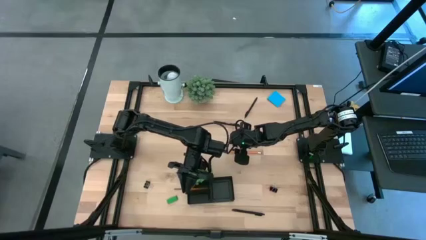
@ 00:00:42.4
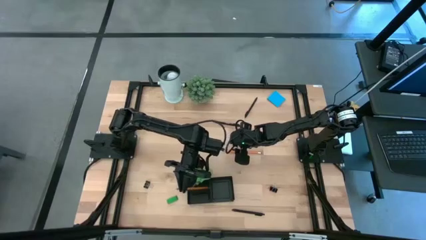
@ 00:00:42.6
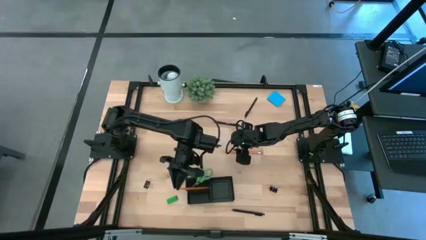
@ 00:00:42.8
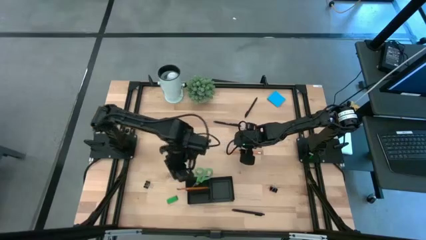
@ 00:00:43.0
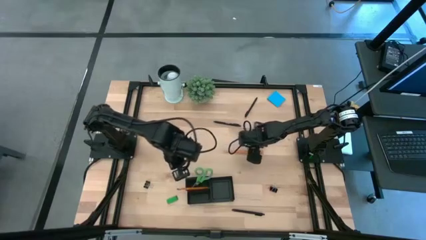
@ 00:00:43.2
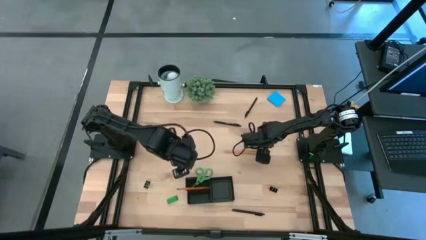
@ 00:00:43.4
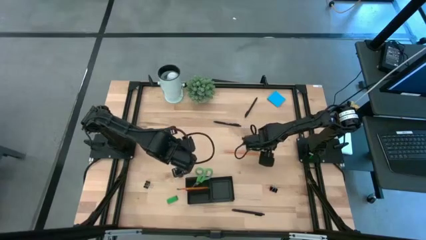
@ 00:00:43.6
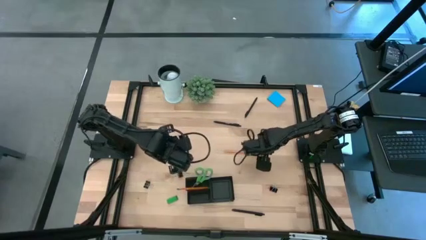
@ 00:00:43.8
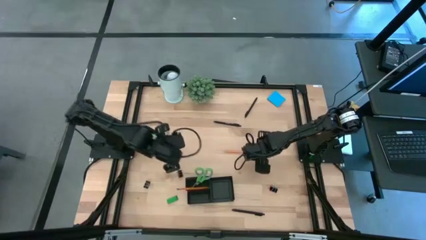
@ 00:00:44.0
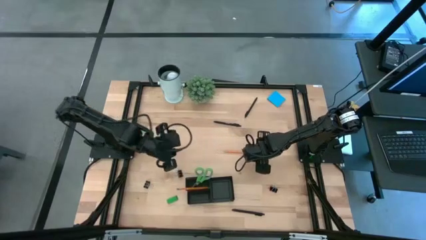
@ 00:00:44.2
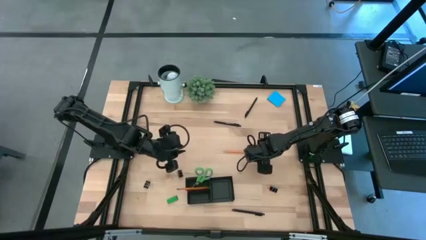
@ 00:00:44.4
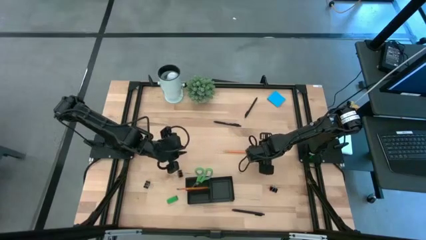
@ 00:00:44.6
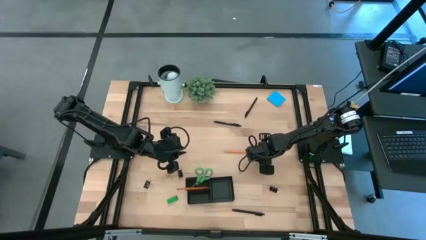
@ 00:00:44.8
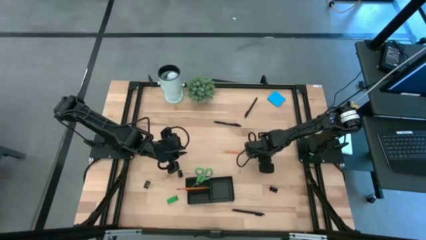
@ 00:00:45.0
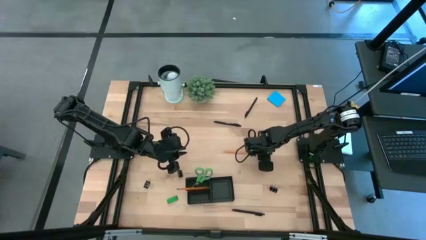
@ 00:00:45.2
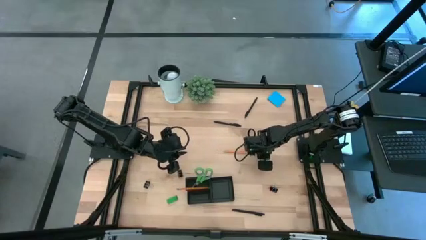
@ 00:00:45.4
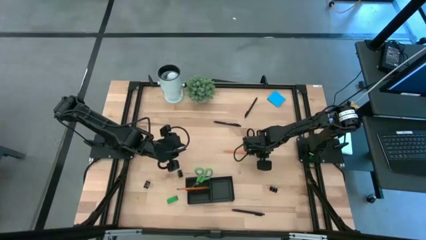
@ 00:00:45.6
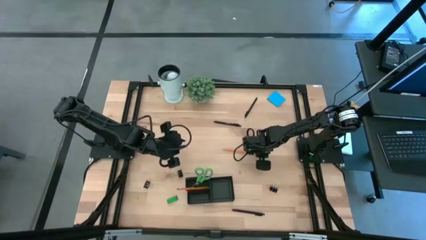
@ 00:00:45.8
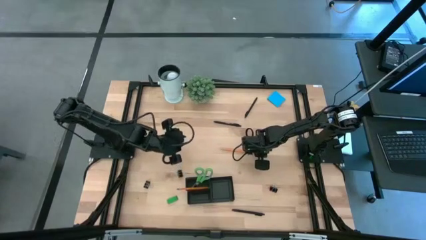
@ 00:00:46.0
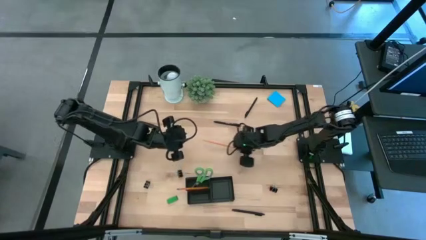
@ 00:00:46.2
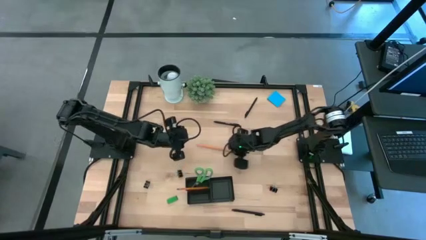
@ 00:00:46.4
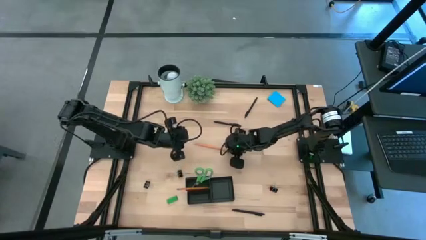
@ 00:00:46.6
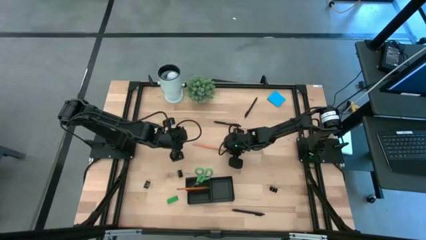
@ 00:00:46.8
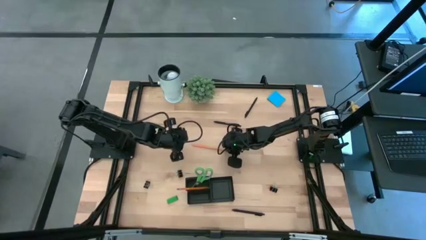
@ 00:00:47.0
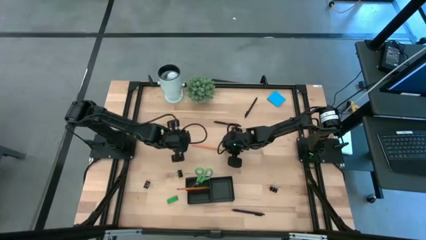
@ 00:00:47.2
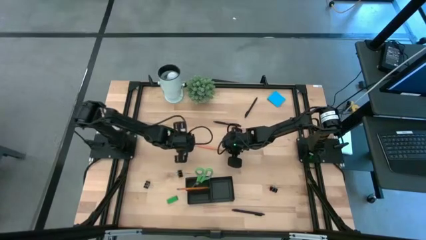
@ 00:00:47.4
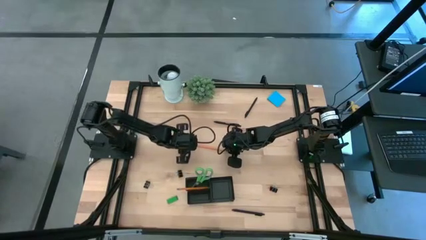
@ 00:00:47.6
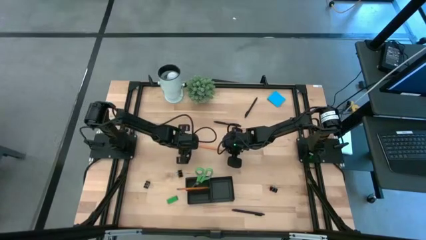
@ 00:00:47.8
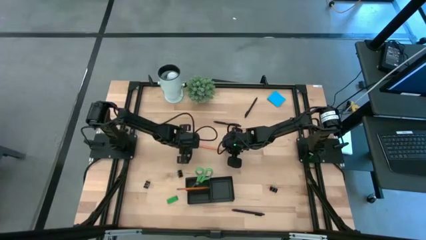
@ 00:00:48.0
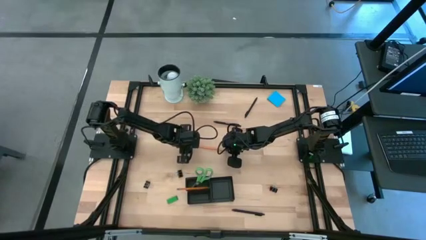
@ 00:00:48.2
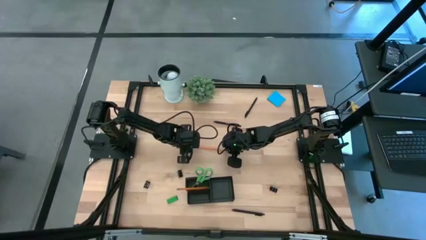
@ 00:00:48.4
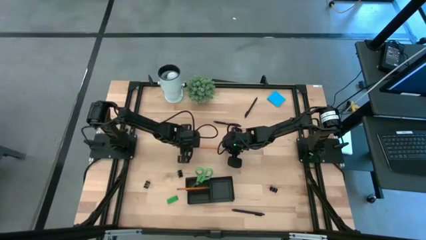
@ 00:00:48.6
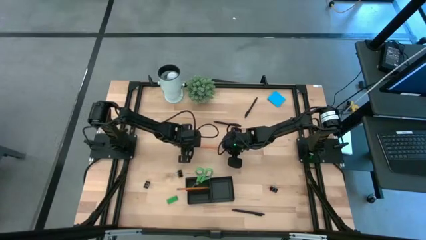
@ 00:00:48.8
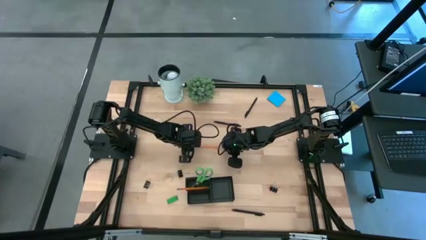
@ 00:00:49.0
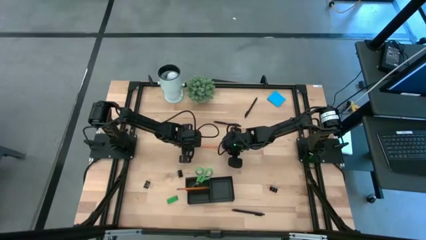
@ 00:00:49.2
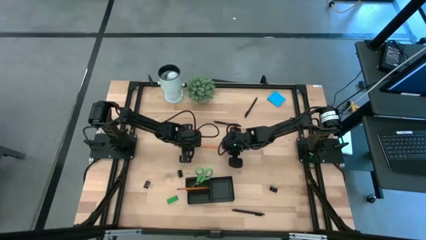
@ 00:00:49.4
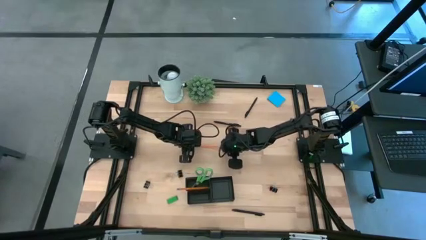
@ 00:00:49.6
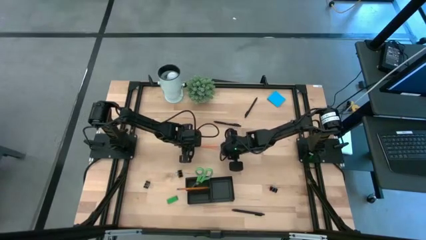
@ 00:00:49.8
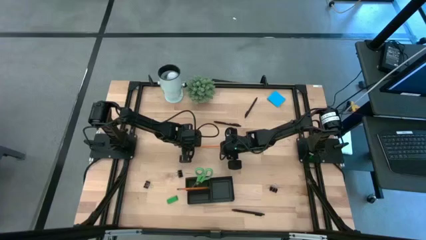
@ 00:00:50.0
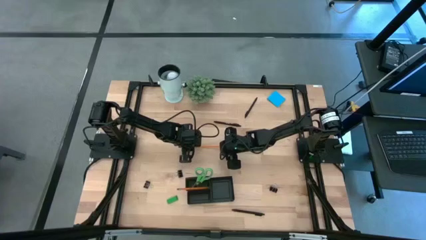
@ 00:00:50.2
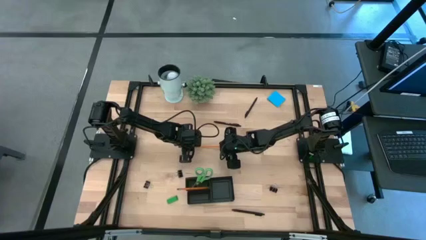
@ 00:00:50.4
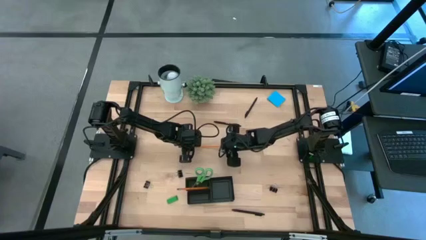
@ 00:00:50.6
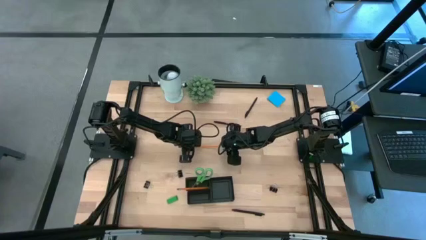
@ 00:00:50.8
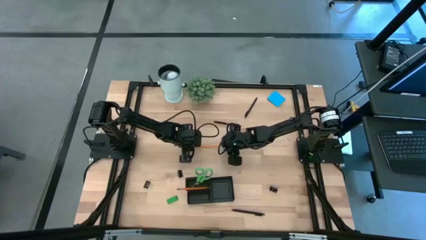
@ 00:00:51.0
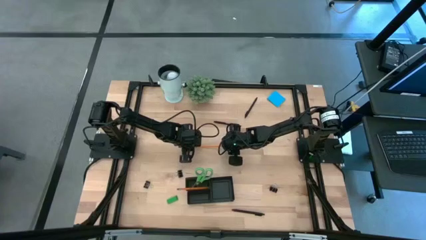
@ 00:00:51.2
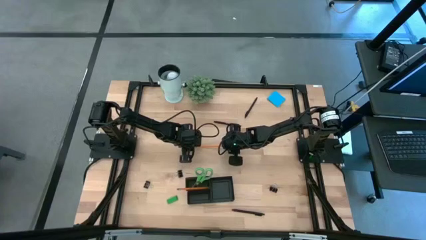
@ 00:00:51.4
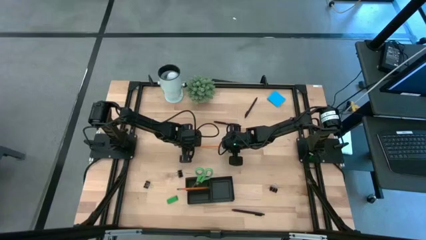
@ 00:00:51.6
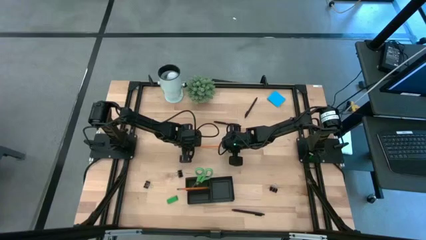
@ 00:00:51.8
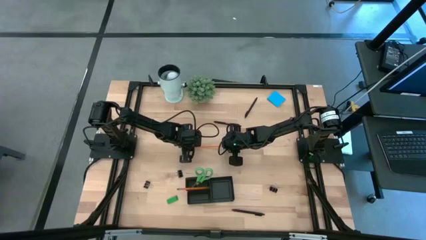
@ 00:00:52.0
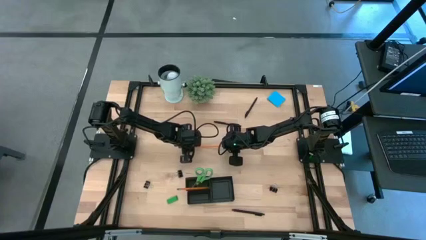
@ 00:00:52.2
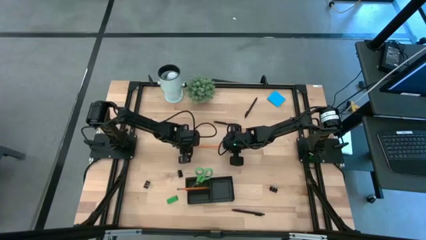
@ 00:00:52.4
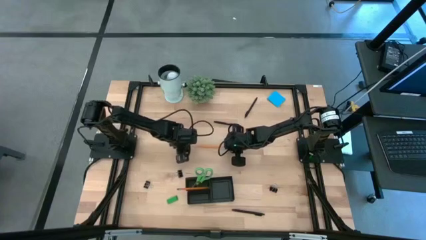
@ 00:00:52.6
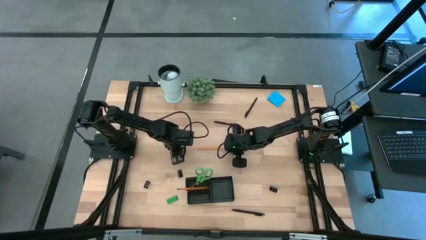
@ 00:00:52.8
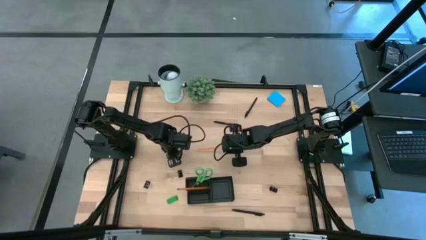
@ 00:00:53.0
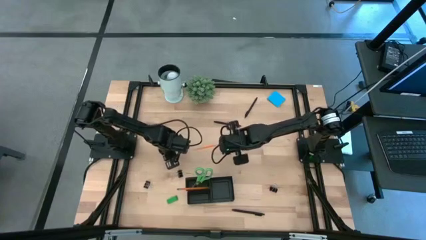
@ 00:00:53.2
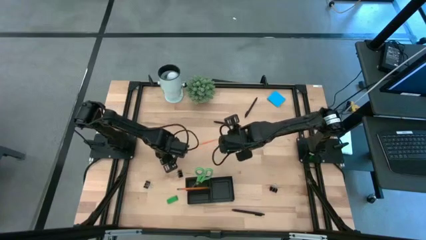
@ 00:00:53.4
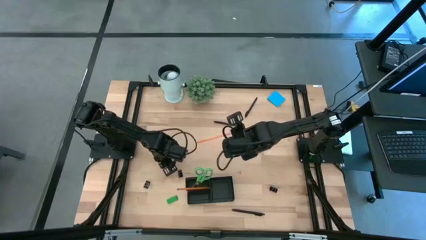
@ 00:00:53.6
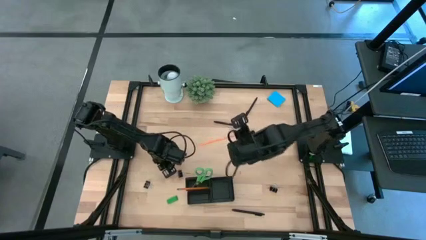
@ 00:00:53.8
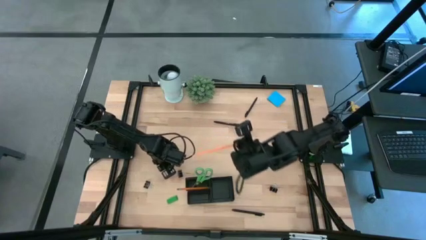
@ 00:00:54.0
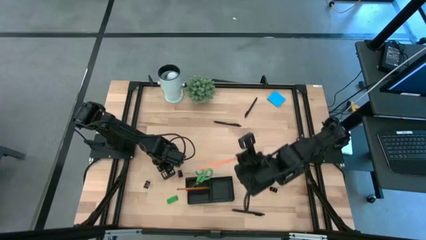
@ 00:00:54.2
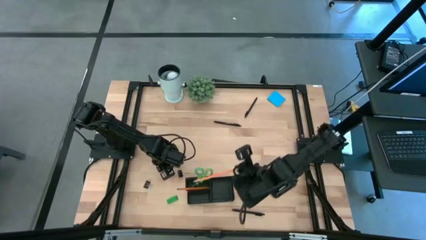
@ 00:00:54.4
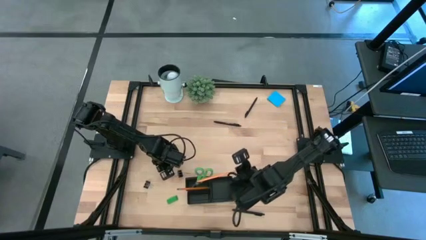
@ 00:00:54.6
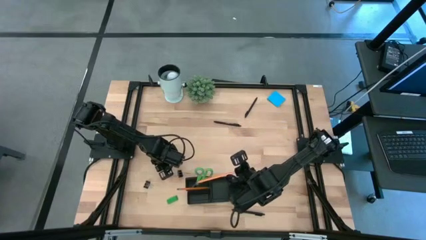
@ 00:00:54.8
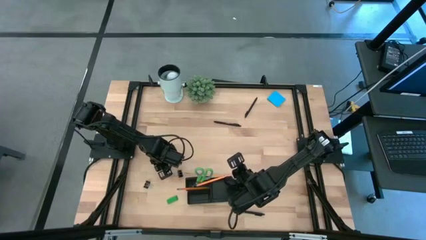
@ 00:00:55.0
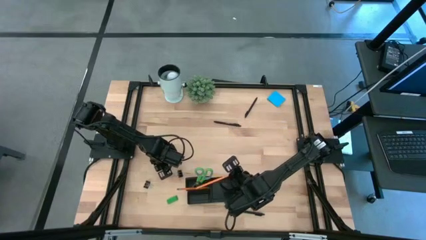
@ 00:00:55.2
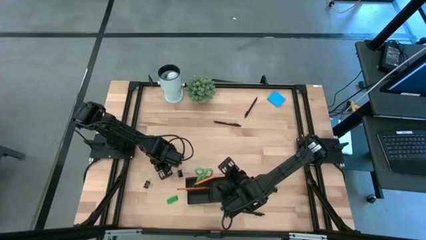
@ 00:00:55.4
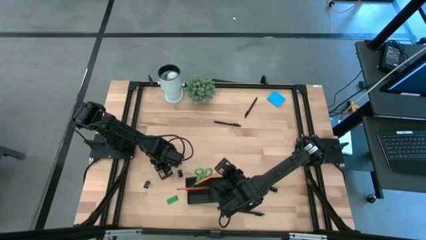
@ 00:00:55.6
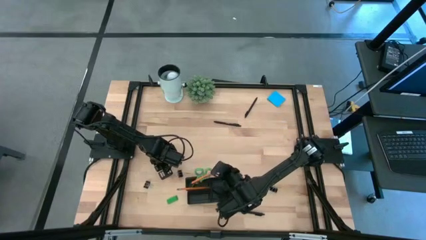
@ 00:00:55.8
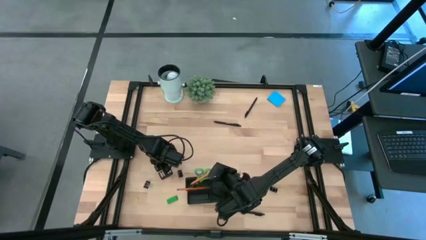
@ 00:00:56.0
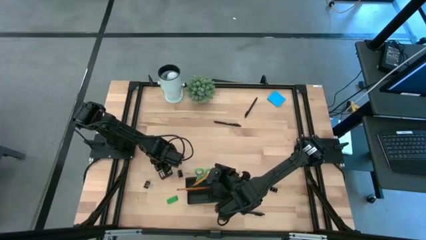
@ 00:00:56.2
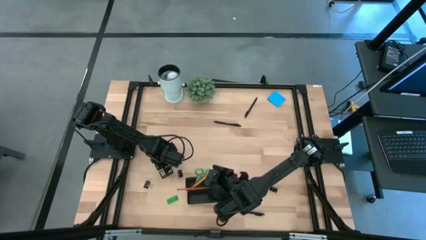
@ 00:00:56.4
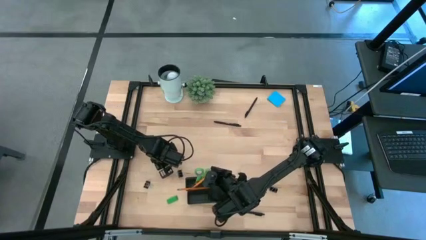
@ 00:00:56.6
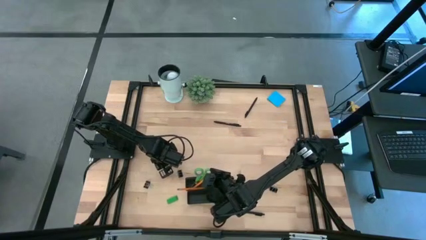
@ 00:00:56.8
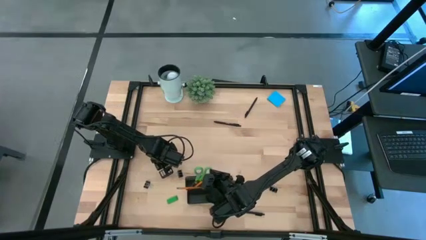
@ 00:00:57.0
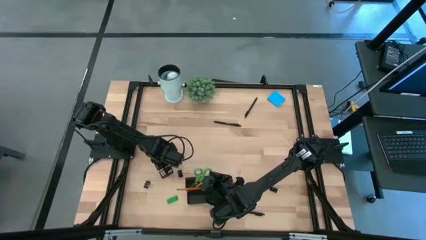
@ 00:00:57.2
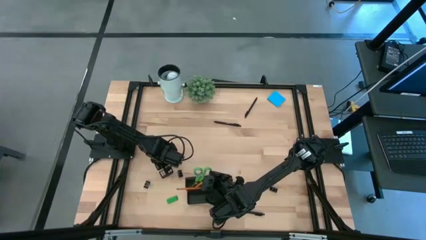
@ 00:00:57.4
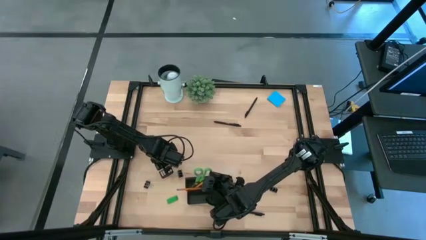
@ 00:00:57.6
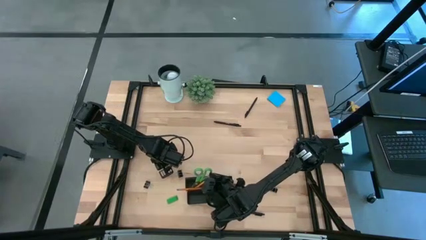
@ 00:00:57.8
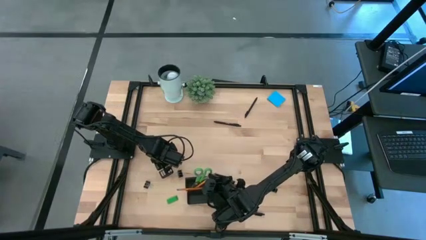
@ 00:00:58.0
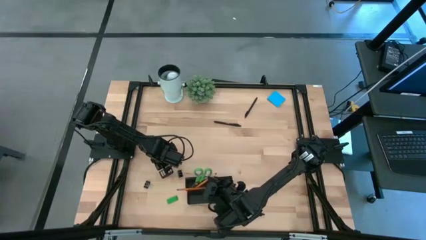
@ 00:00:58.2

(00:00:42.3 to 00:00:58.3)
Task: Pick and place office supplies into organizer
Put the orange pencil into the black desk organizer
